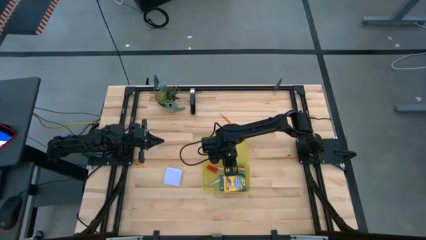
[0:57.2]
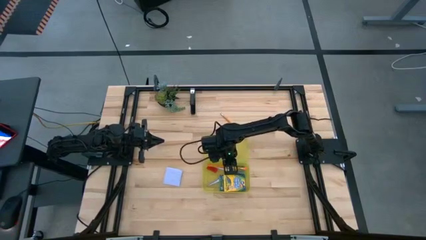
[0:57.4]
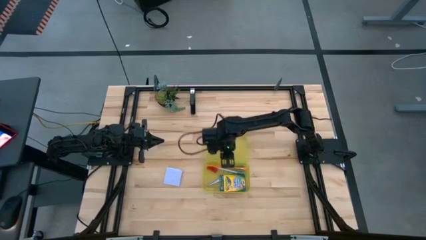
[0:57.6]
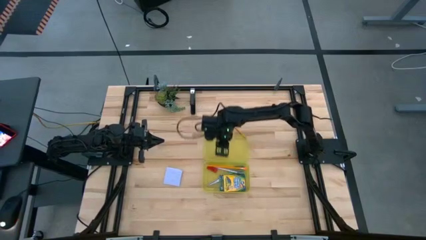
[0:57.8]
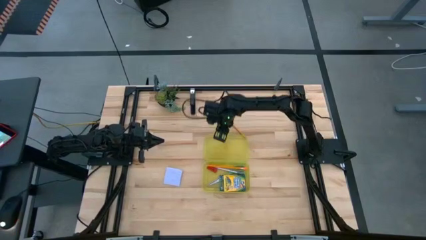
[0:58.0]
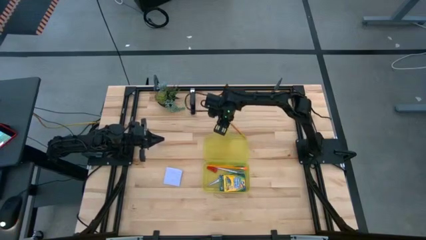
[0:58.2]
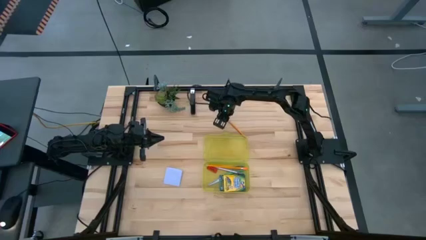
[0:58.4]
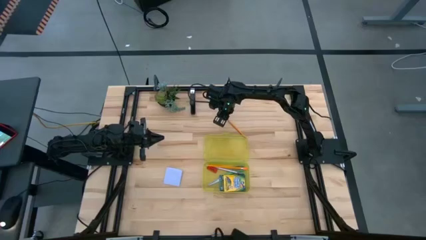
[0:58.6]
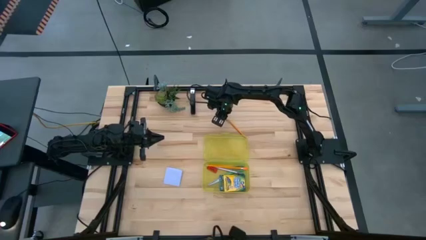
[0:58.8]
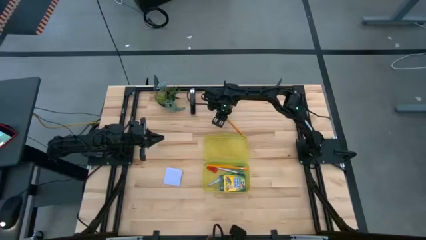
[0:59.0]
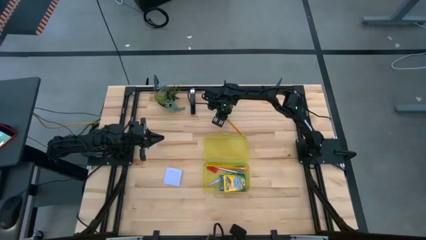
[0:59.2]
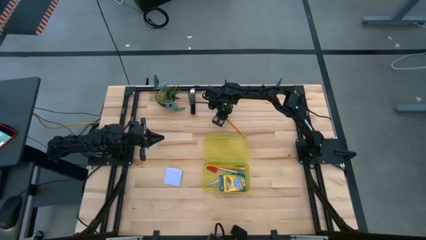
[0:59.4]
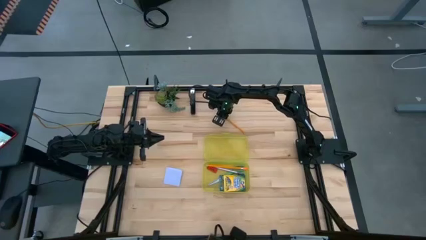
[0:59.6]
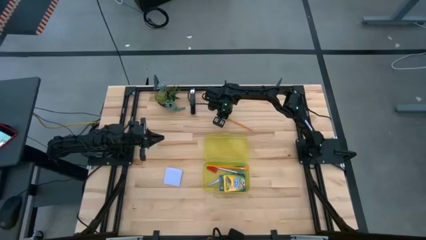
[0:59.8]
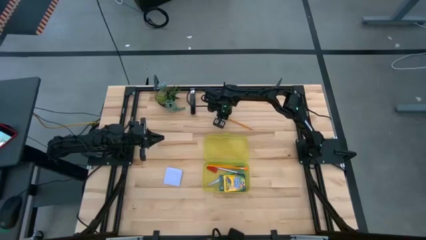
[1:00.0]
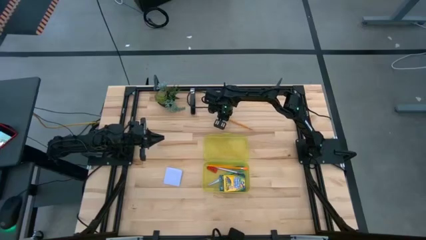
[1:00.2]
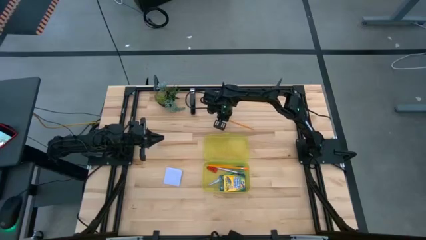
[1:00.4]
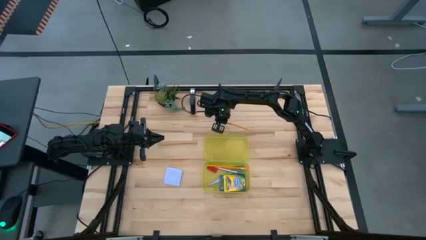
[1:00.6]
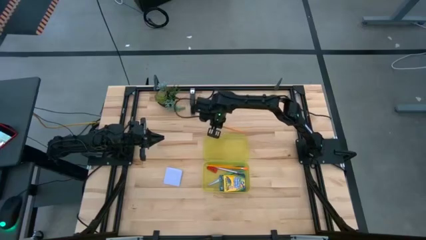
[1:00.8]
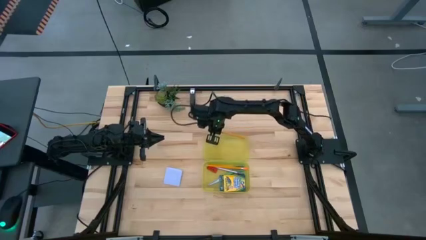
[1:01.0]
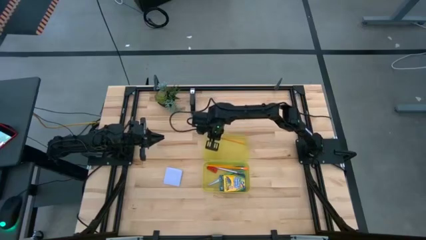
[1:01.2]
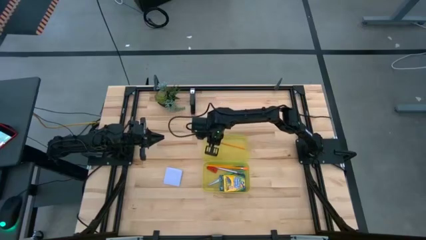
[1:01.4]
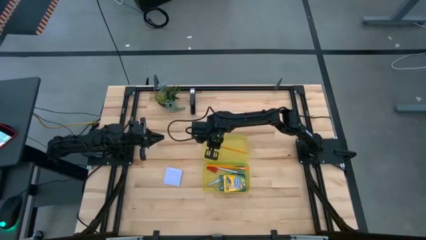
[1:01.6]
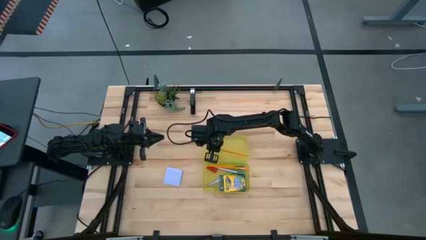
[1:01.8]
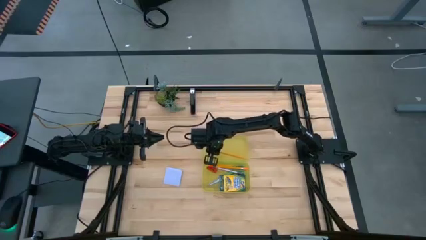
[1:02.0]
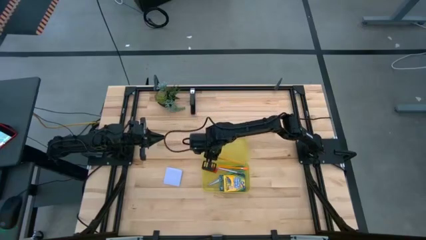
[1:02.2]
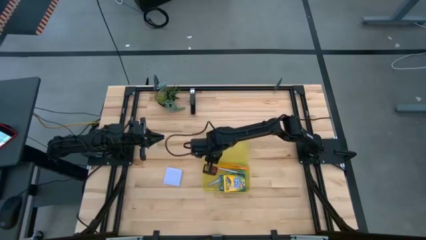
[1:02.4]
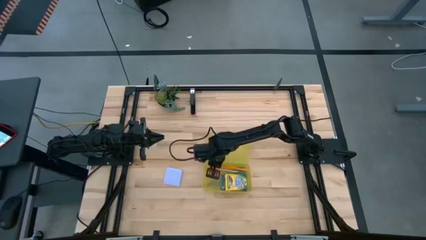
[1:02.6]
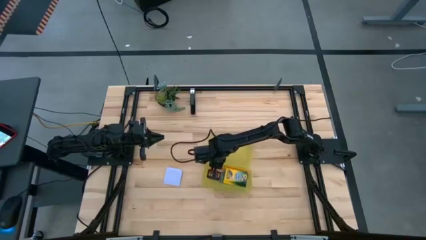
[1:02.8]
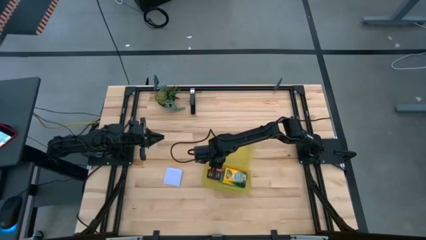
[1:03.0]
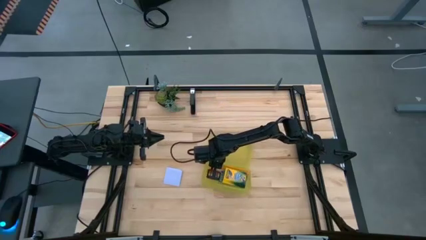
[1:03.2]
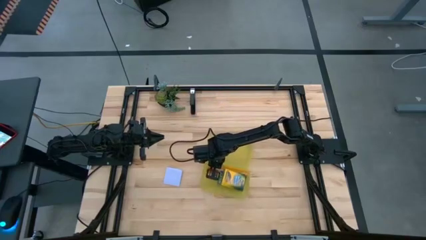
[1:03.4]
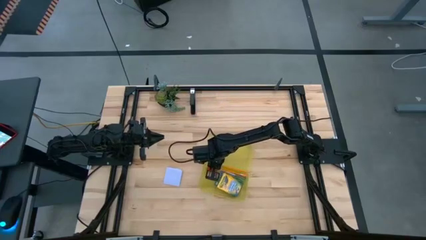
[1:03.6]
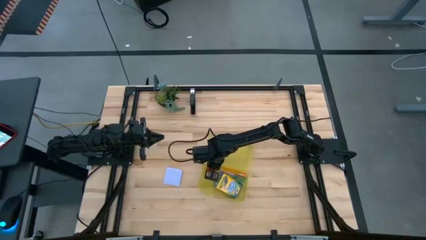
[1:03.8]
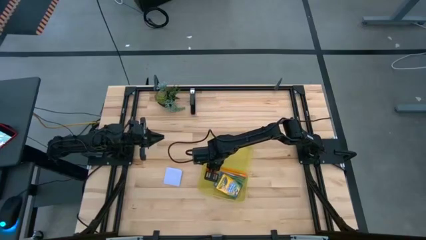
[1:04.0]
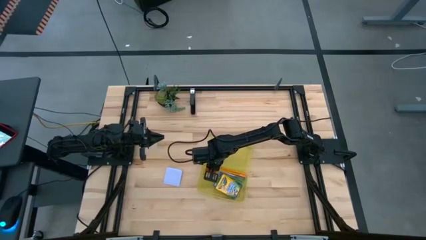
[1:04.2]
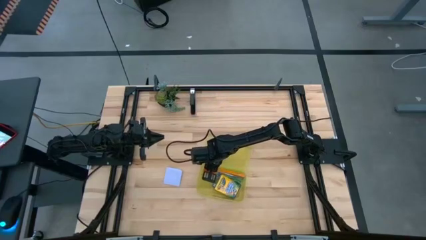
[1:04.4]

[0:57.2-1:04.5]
Task: Pack school essentials
Put the yellow pencil into the yellow supply box
